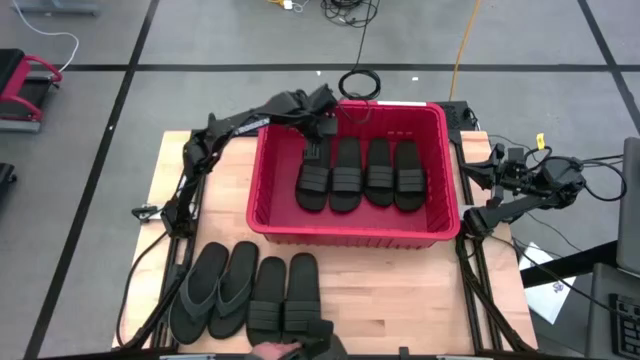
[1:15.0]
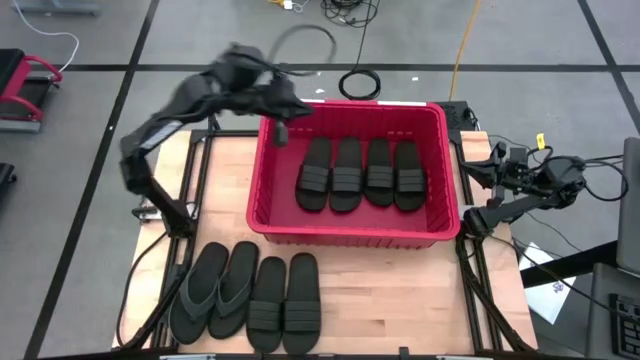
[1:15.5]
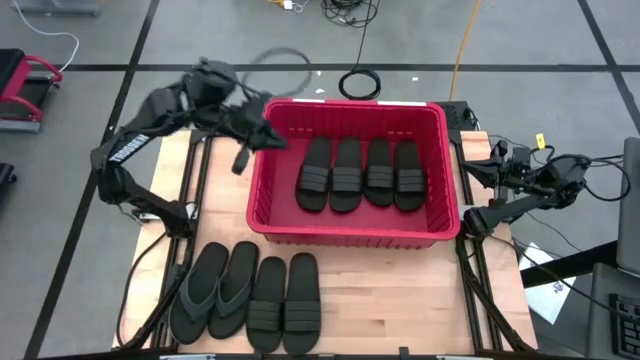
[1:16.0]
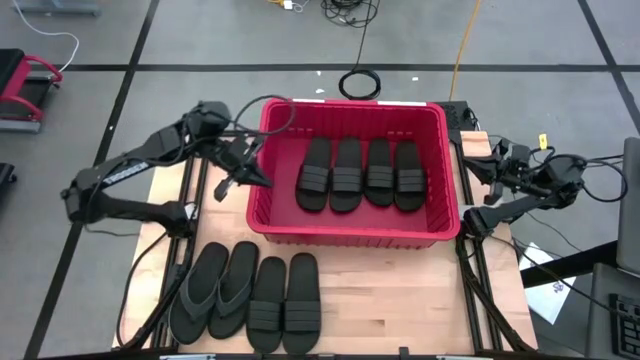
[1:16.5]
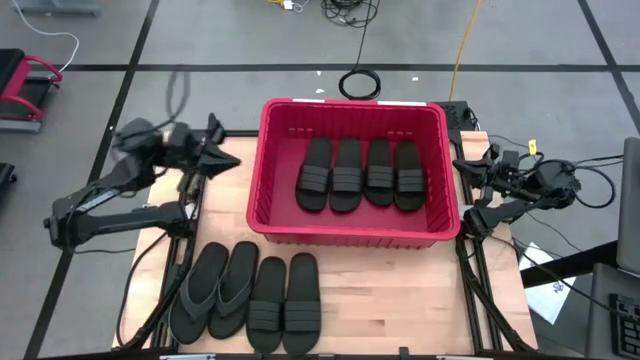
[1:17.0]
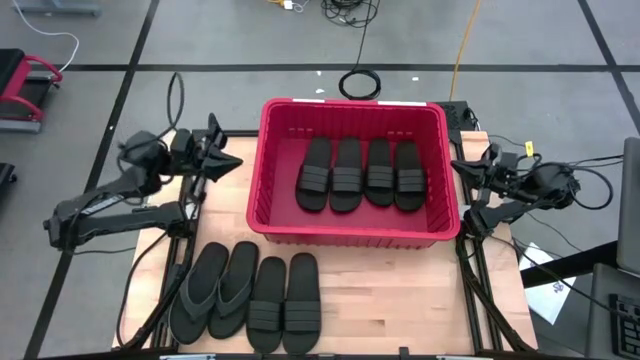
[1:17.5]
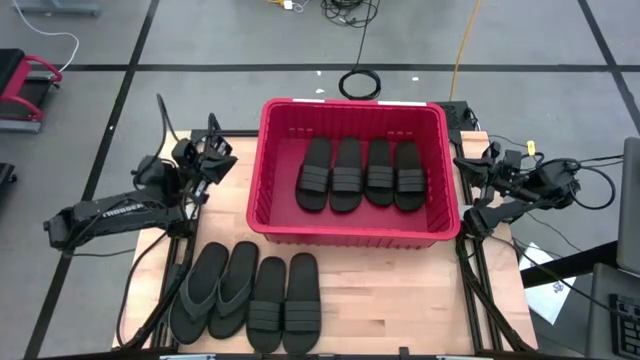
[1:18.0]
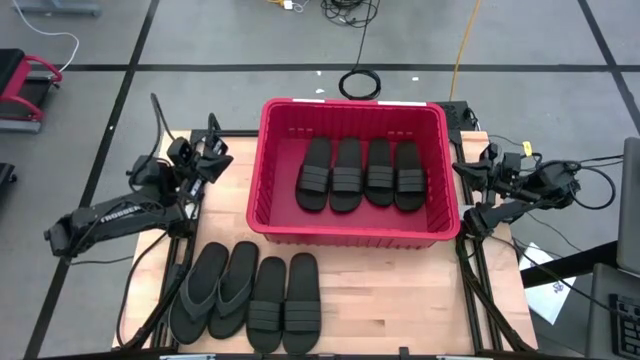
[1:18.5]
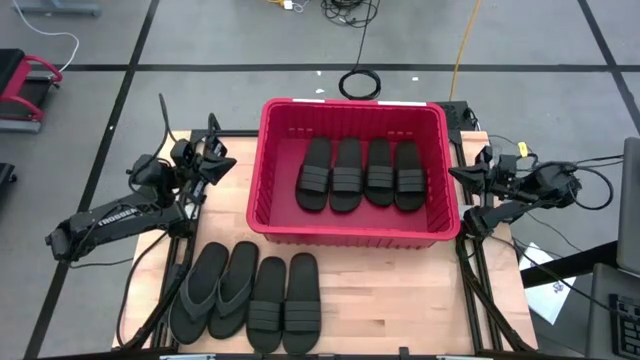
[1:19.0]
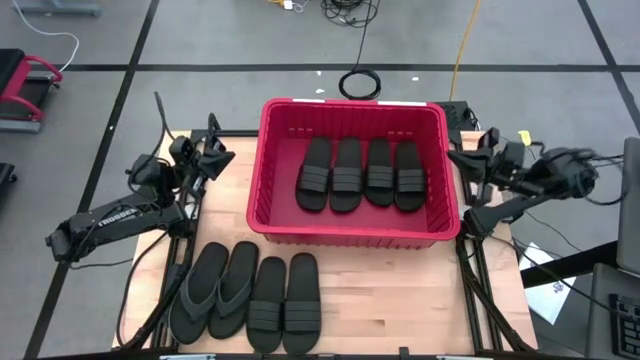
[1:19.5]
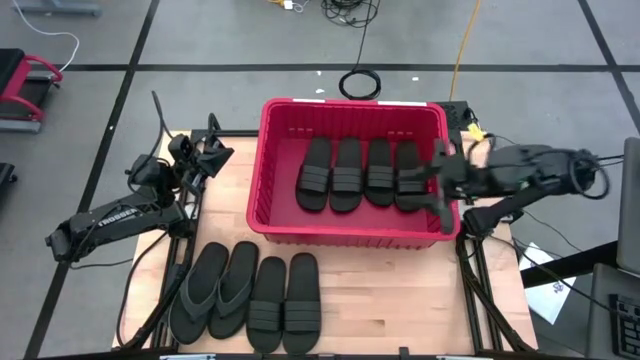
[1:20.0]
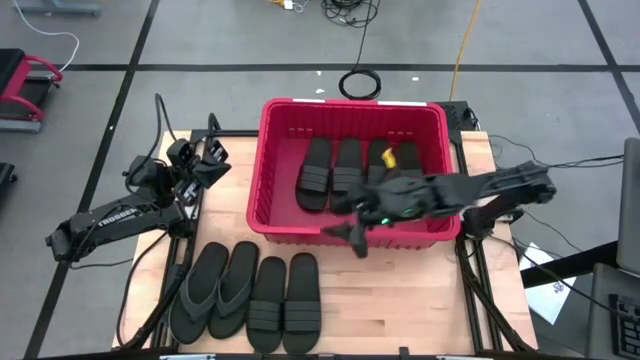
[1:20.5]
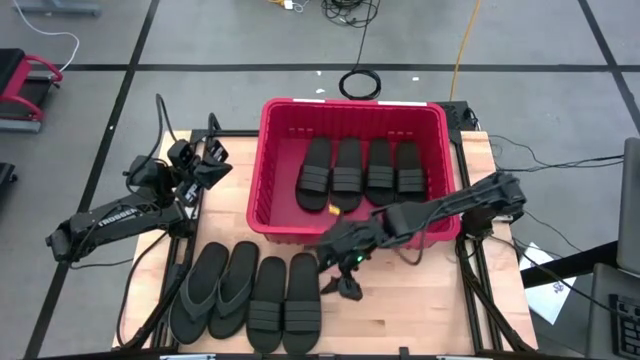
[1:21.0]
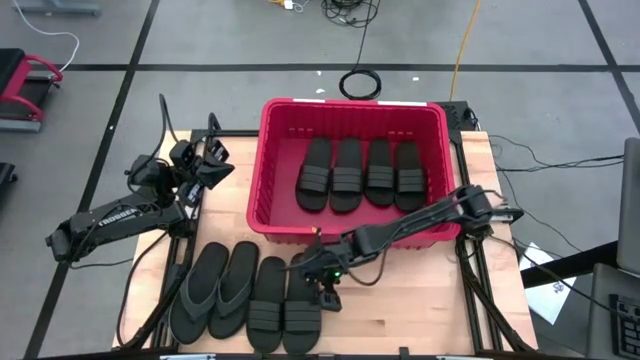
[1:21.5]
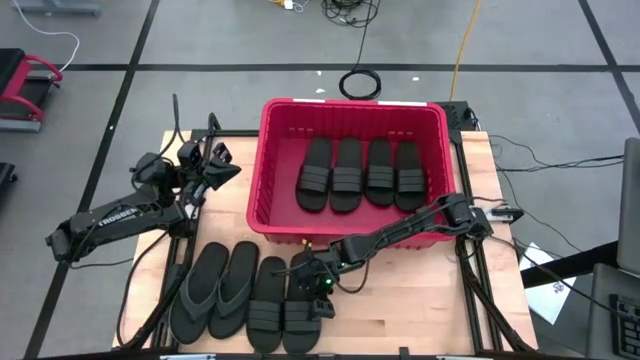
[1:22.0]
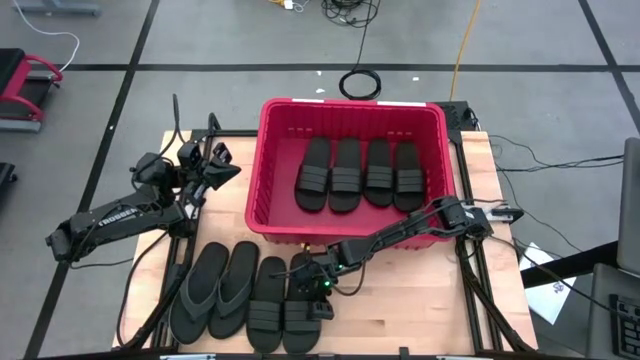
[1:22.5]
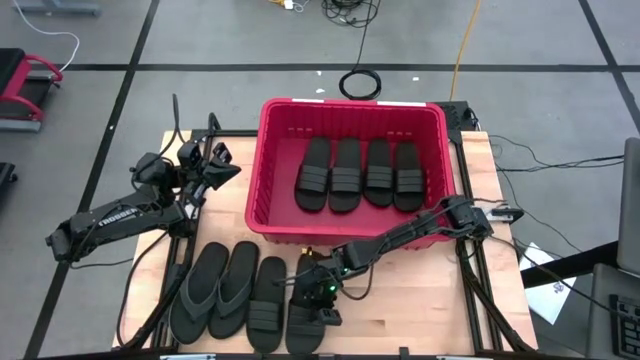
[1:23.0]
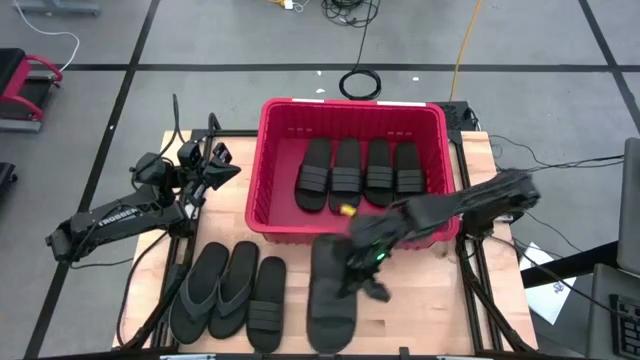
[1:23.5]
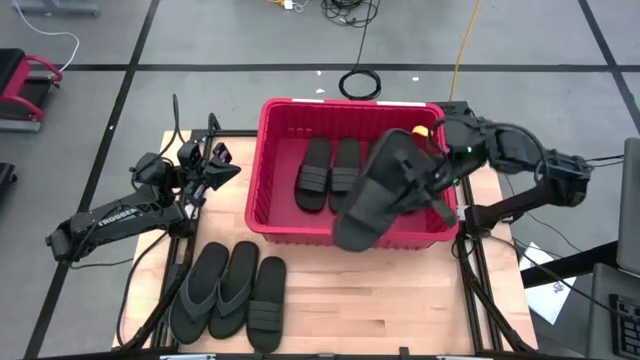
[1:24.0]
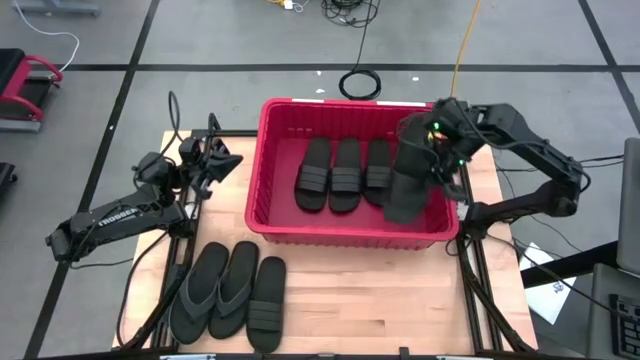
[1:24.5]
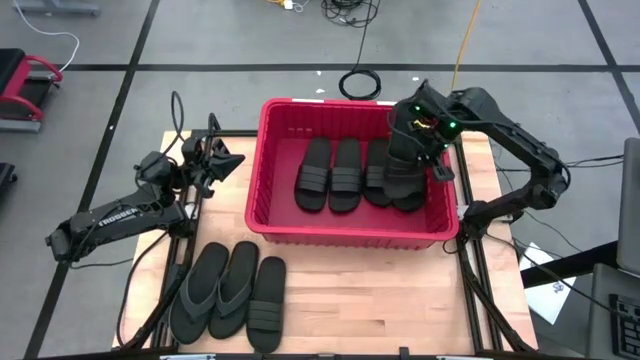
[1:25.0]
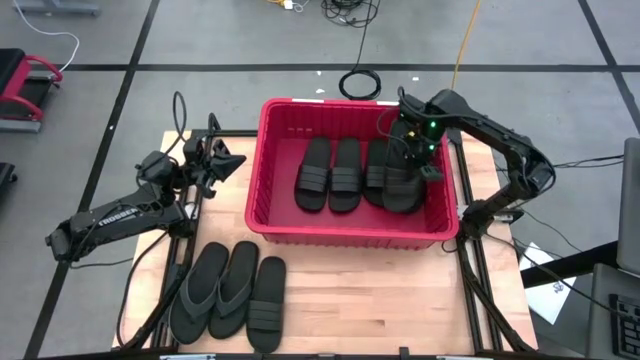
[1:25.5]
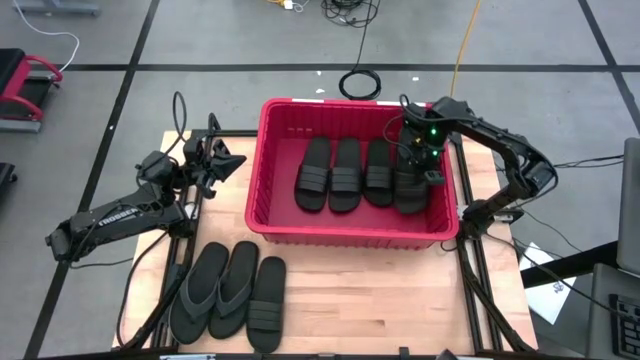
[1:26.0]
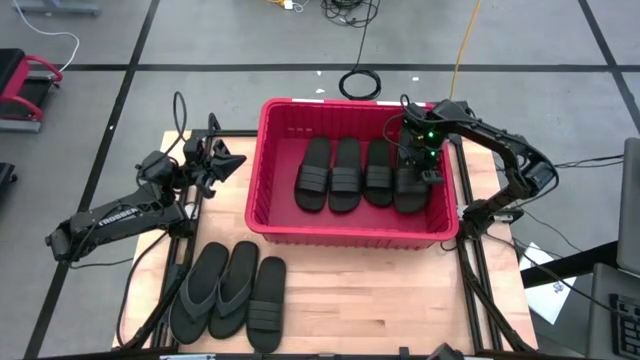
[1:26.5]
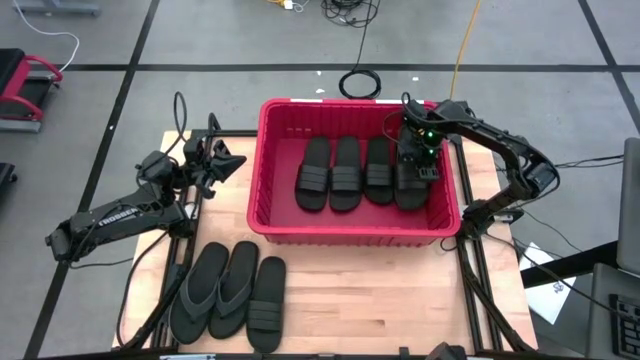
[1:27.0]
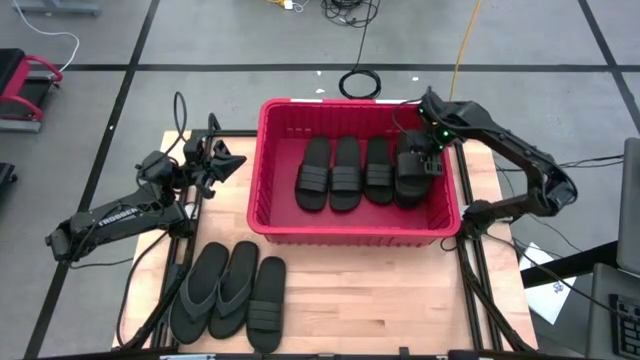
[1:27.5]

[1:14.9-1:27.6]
Task: Pick and place slides into bin
Put the black slide into the red bin

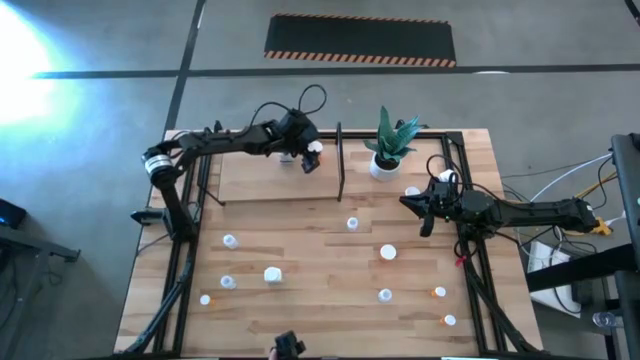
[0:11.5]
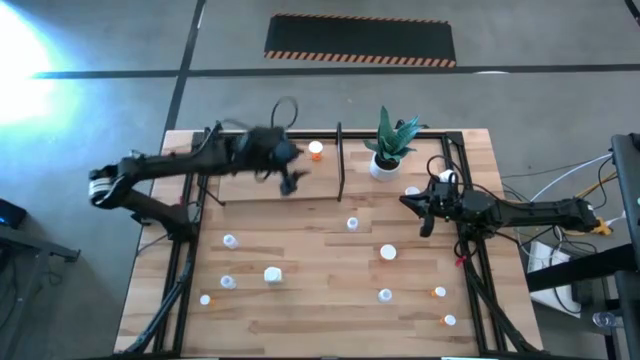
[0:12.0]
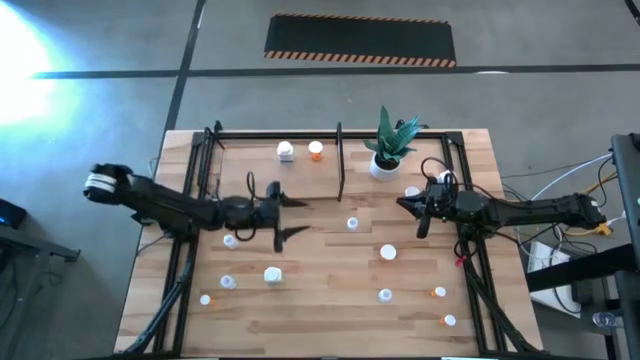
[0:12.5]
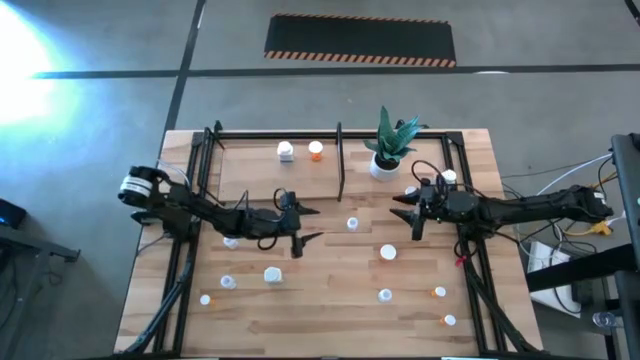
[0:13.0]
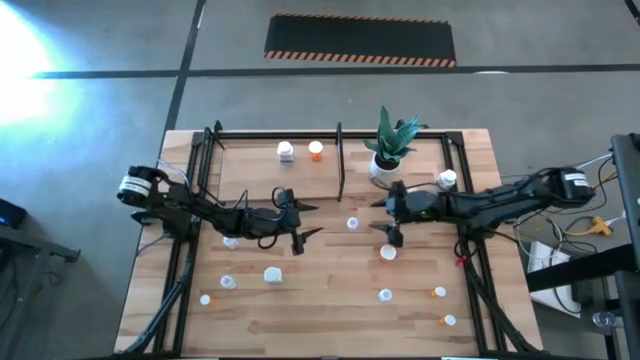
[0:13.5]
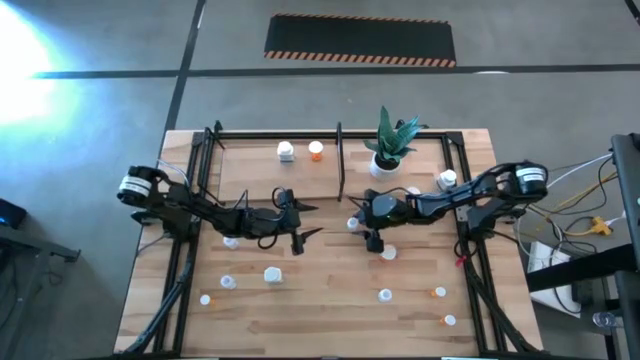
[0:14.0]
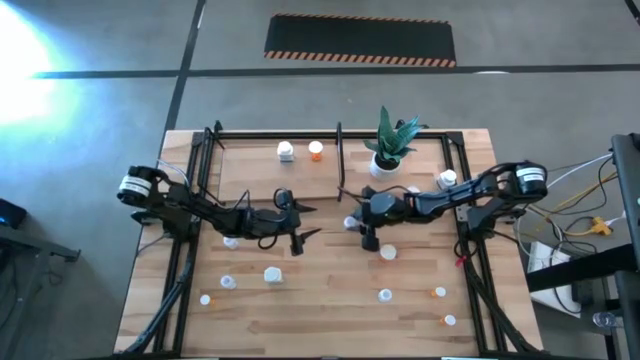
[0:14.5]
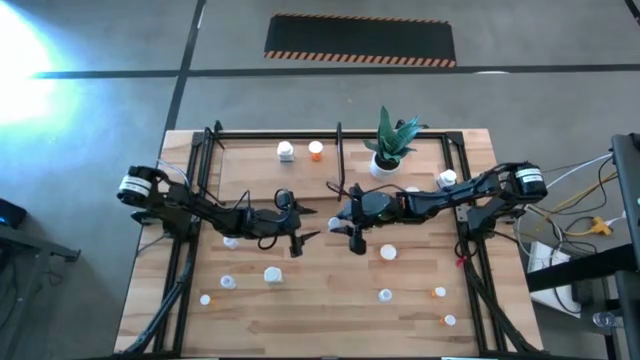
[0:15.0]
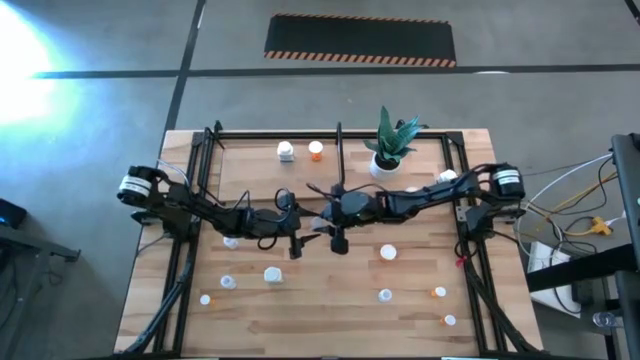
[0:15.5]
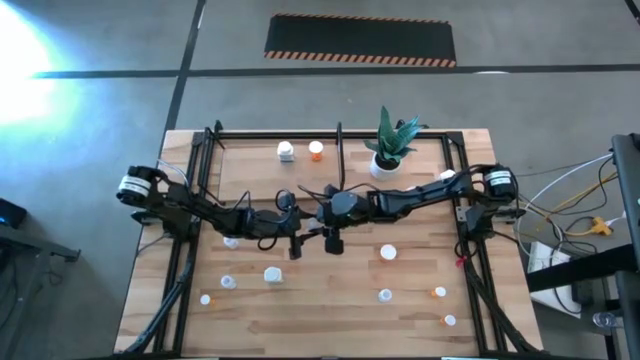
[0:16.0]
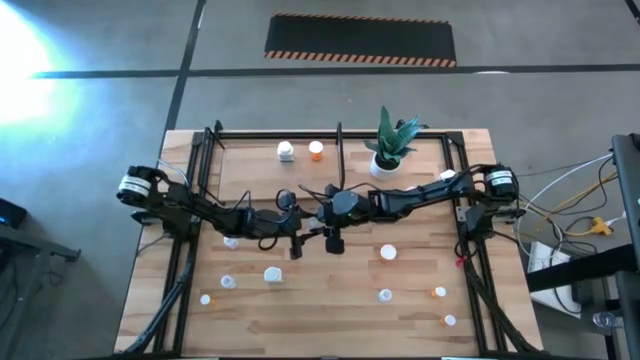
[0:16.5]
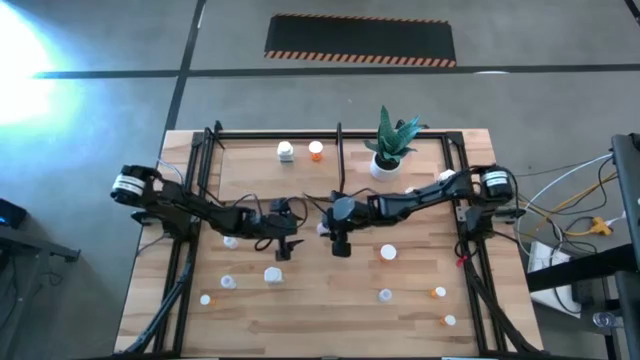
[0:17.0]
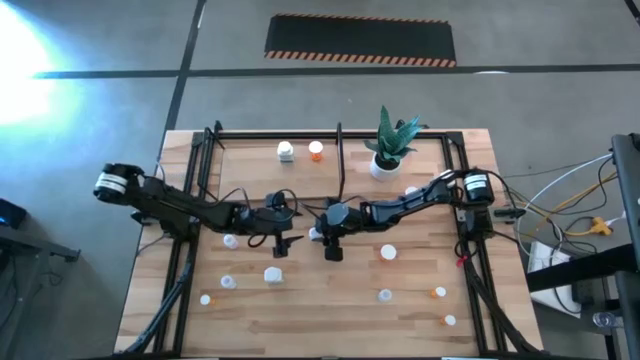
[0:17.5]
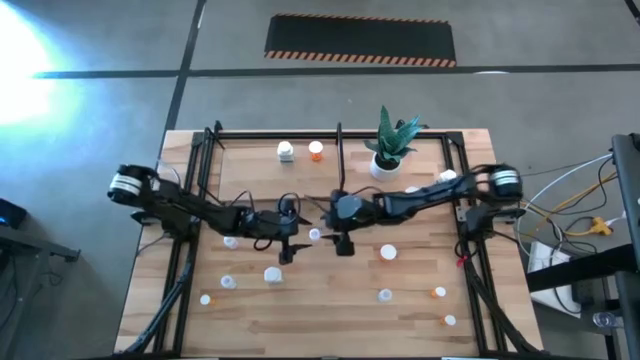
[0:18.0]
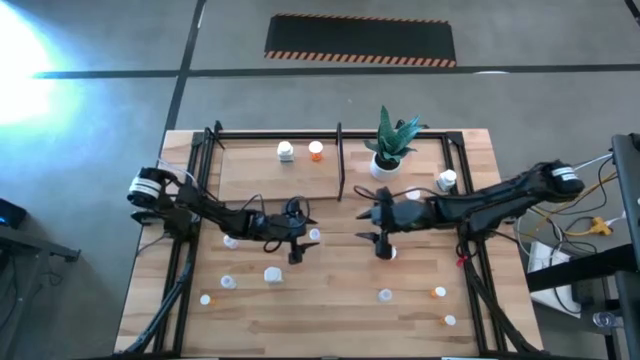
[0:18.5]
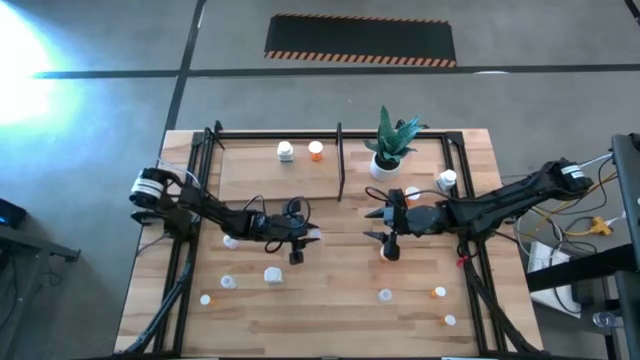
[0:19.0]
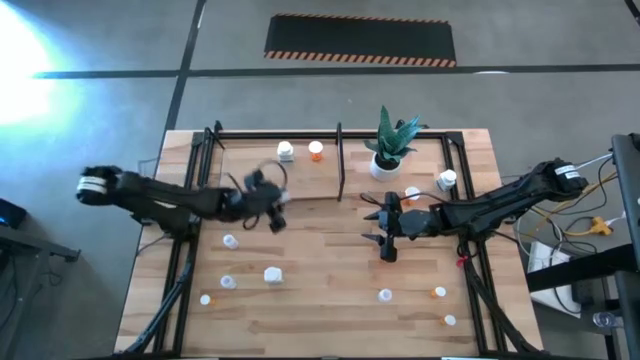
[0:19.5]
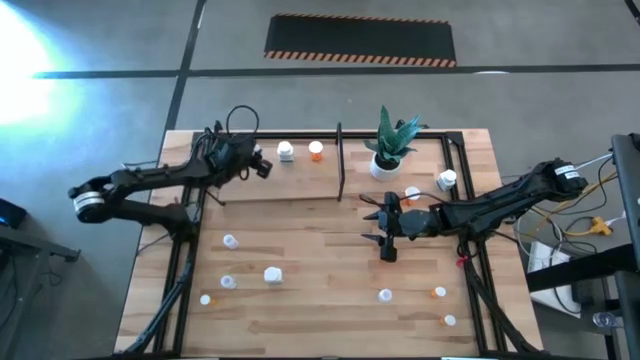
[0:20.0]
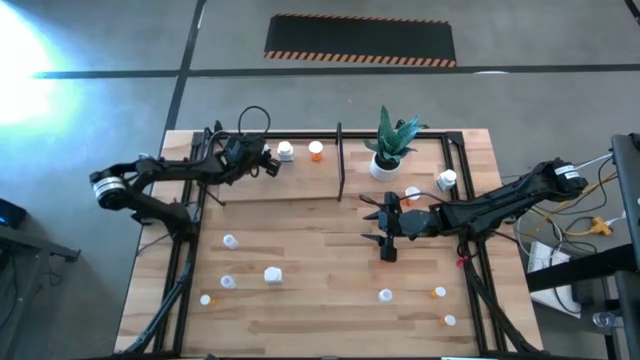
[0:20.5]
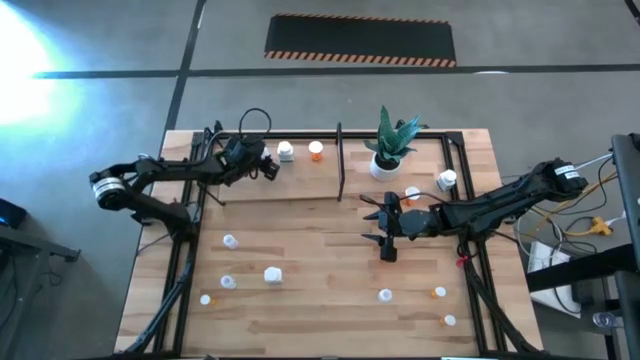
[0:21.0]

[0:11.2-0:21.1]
Task: Pick and place medicine bottles onto shelf by color
Put the transparent medicine container onto the shelf
